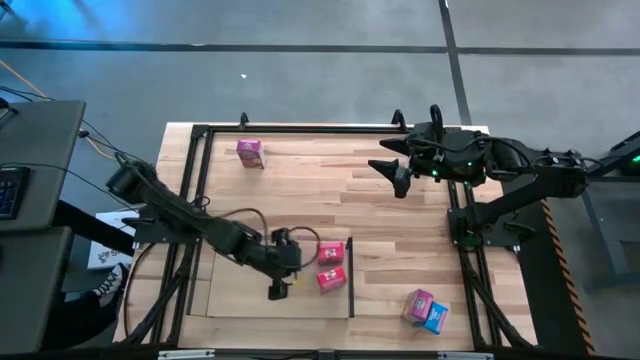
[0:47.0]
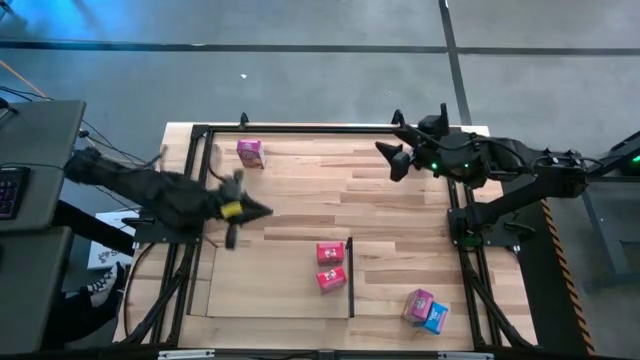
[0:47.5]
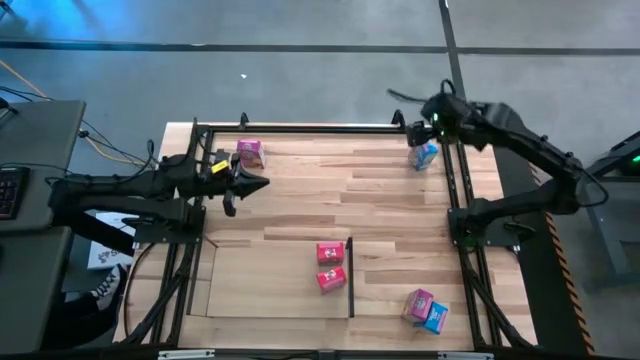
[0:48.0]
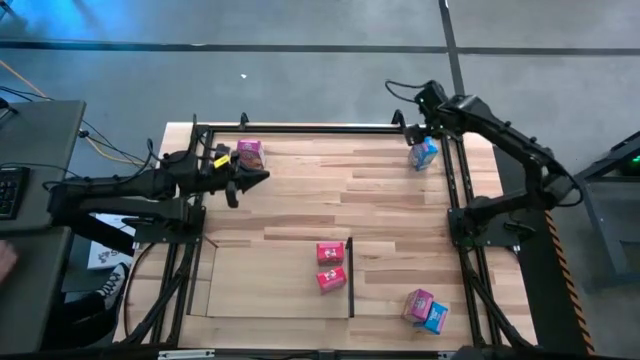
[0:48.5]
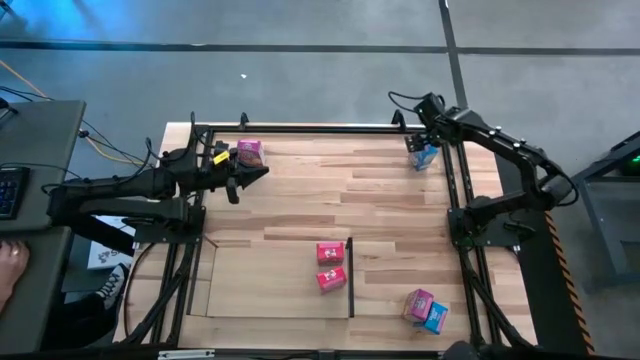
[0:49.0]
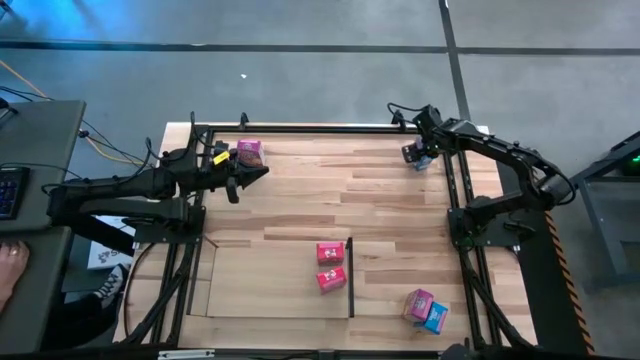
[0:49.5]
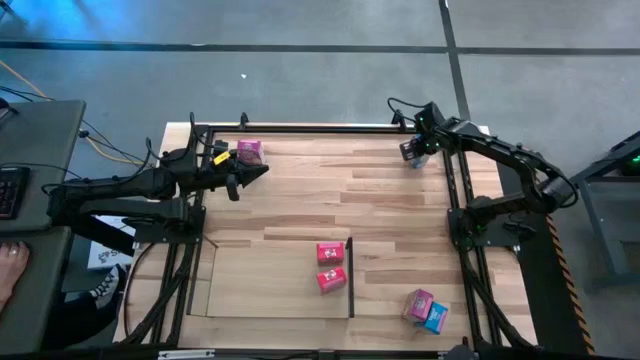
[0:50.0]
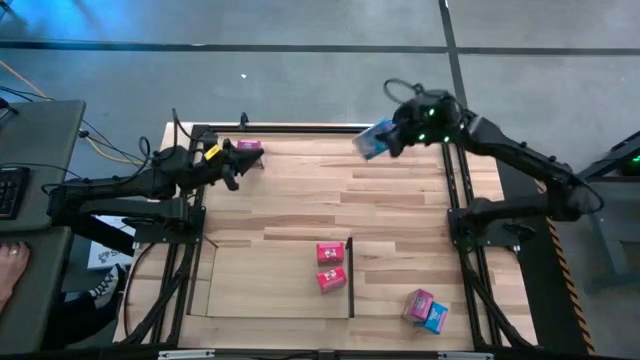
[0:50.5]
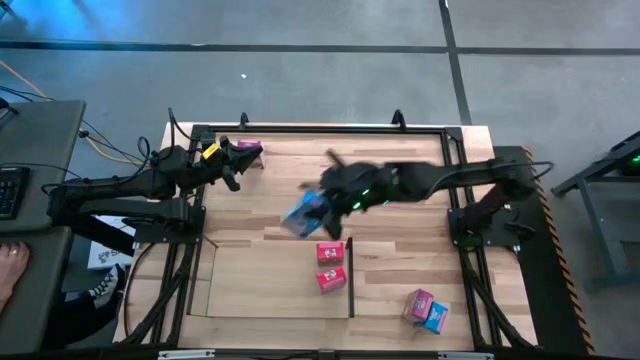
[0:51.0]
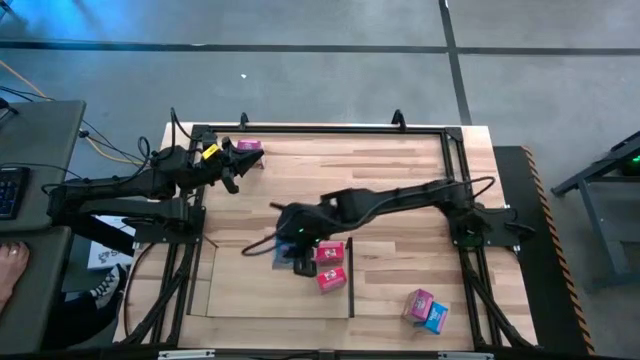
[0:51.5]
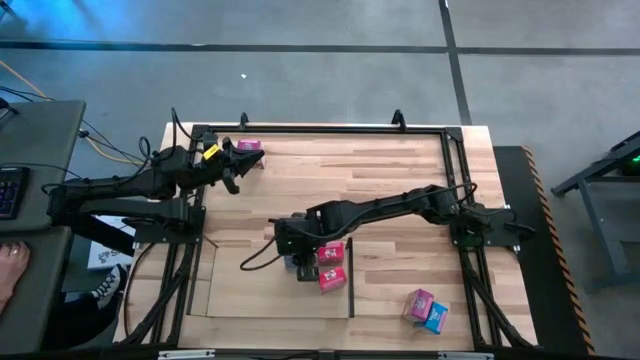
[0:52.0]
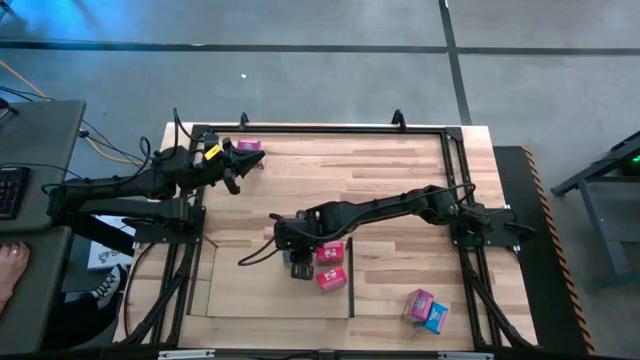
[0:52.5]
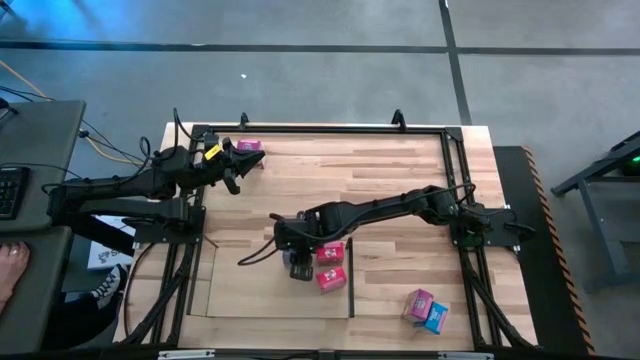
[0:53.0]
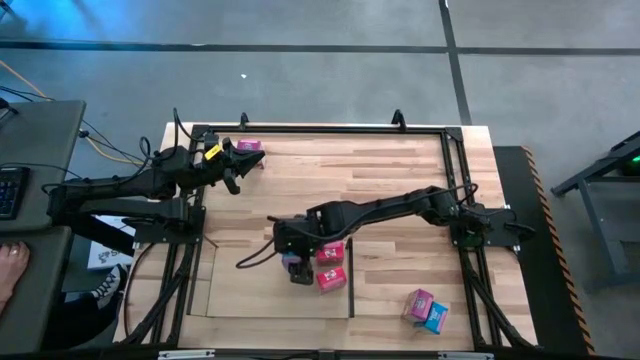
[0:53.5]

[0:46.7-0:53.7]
Task: Stack cereal on shelf
Put the top blue cereal box on the shelf

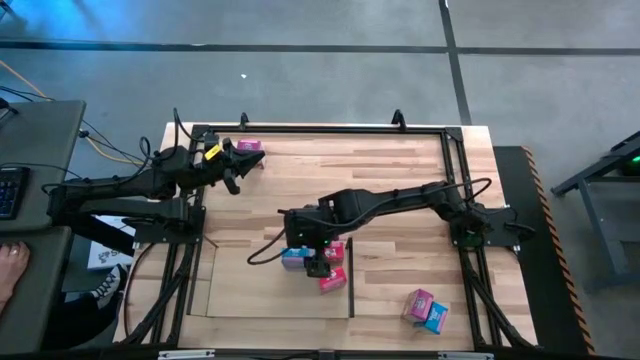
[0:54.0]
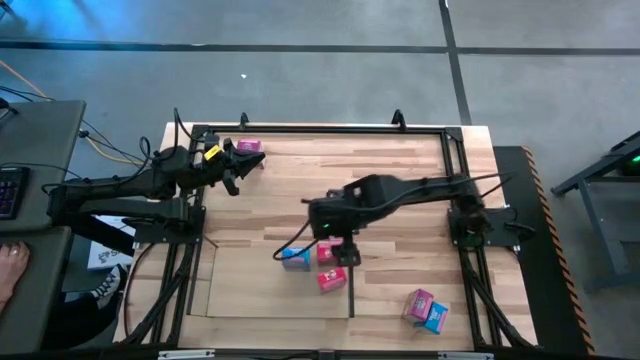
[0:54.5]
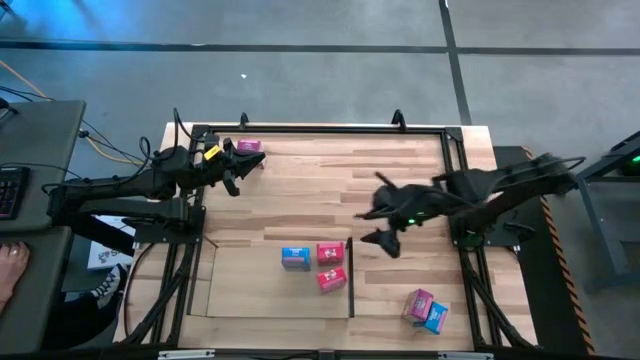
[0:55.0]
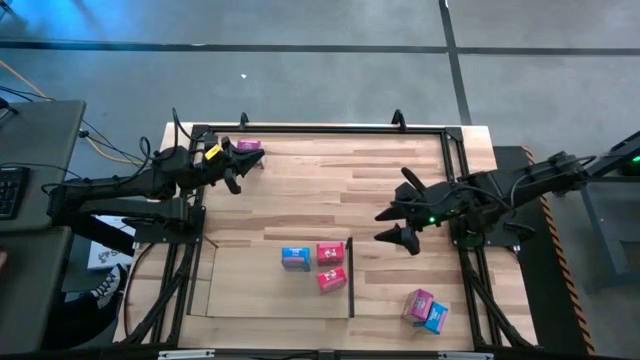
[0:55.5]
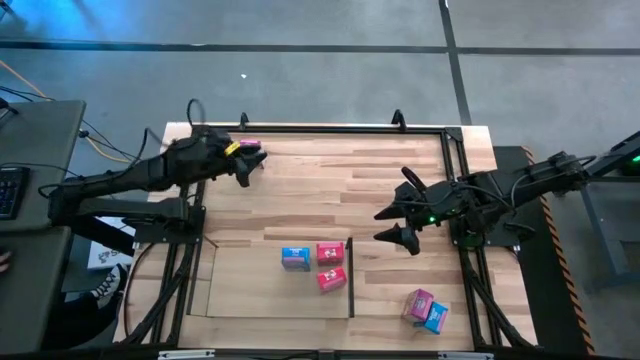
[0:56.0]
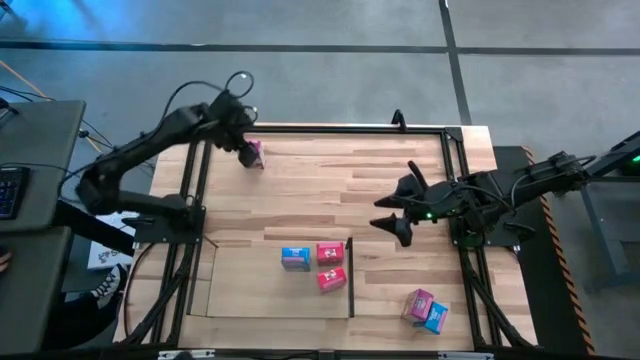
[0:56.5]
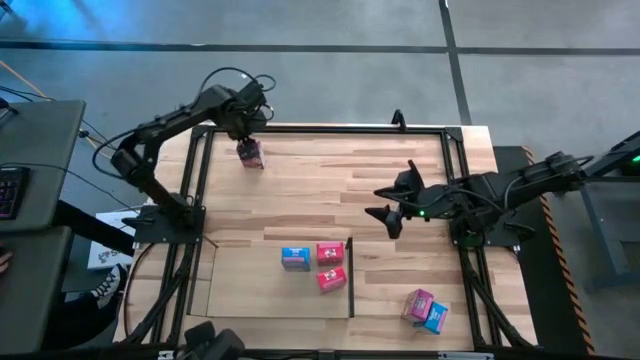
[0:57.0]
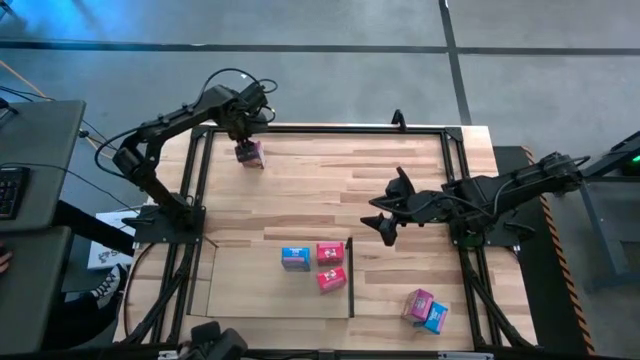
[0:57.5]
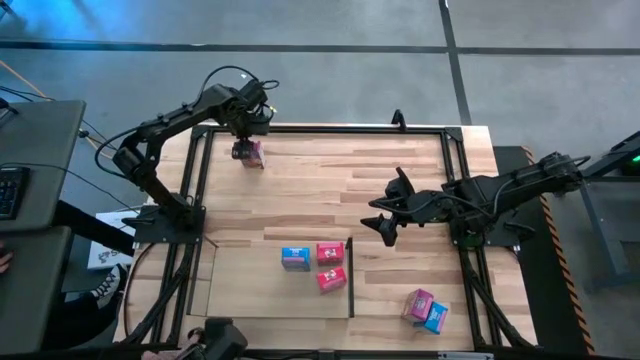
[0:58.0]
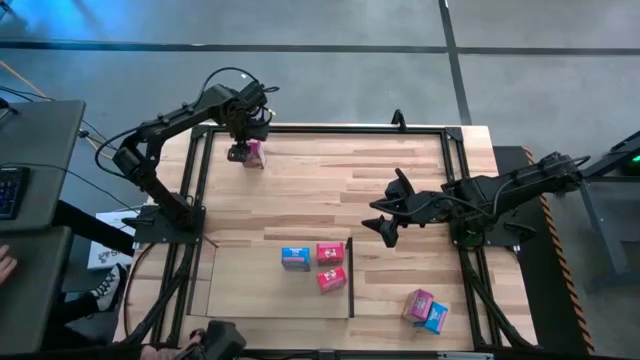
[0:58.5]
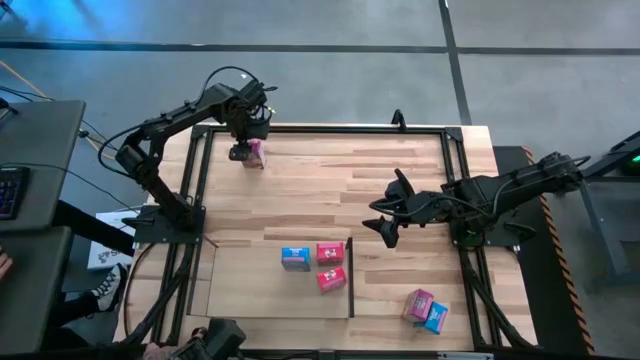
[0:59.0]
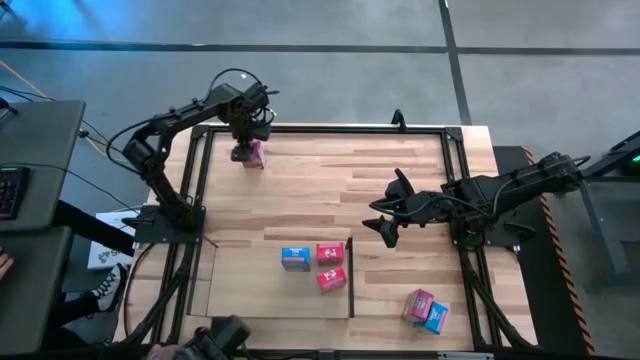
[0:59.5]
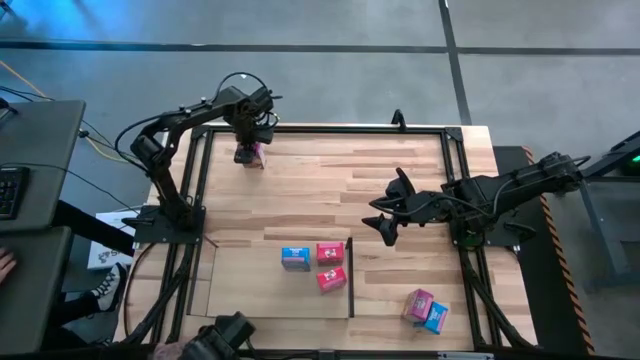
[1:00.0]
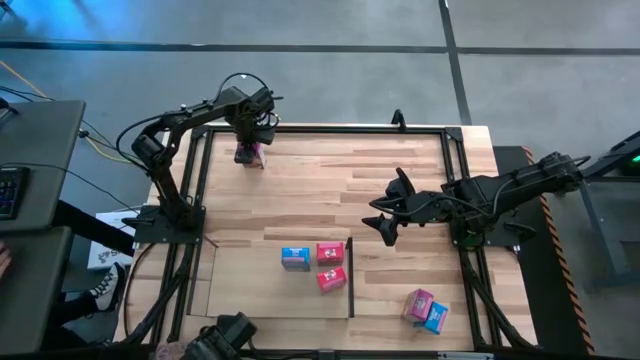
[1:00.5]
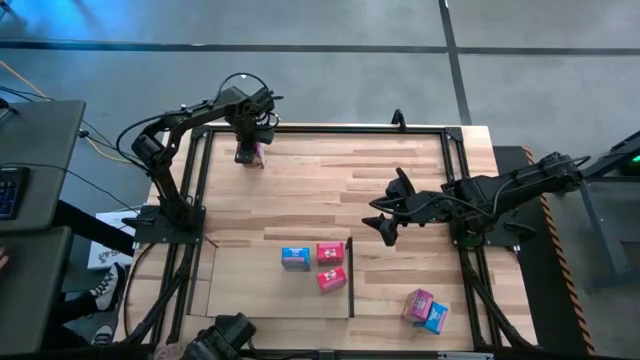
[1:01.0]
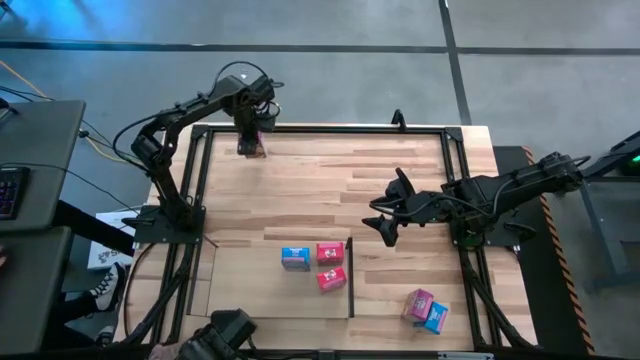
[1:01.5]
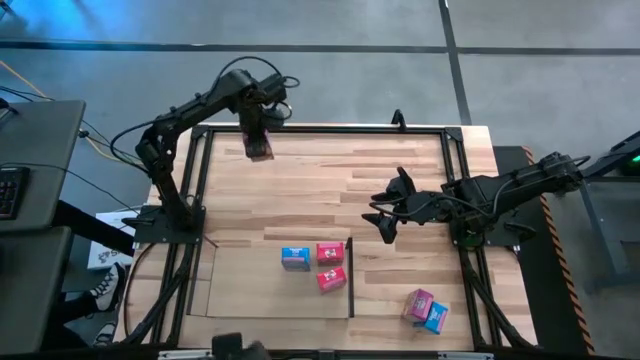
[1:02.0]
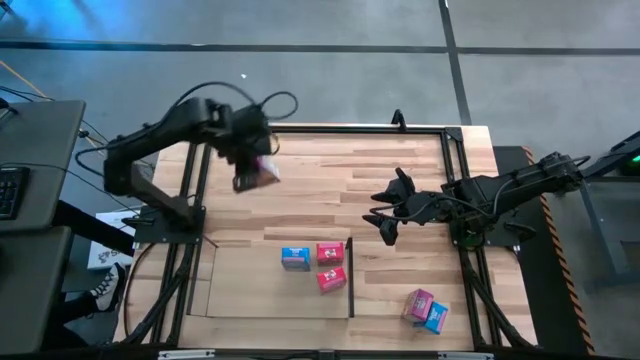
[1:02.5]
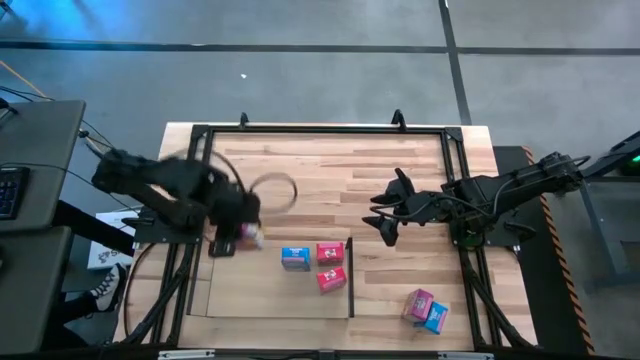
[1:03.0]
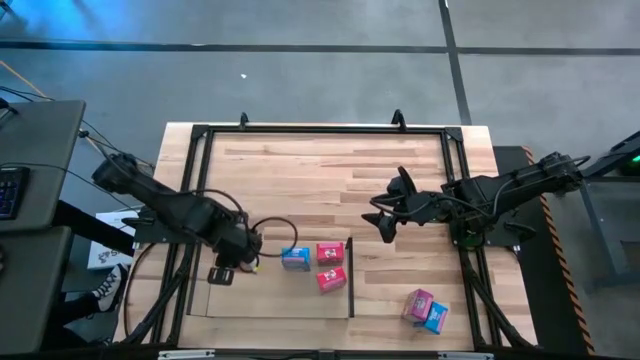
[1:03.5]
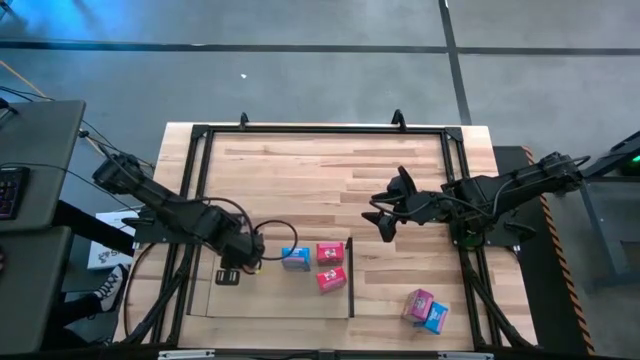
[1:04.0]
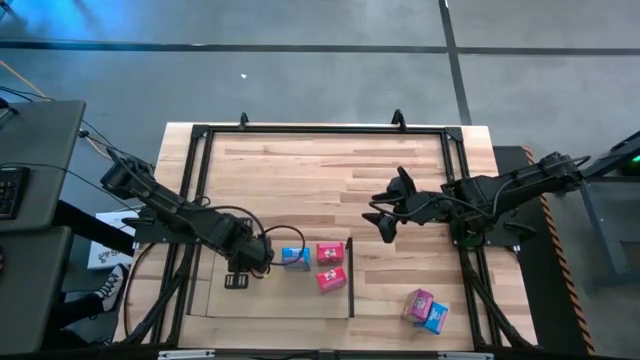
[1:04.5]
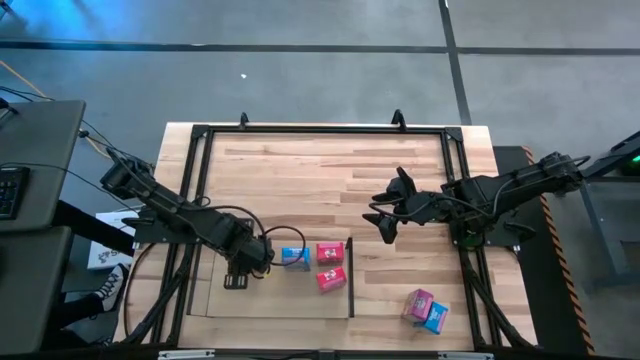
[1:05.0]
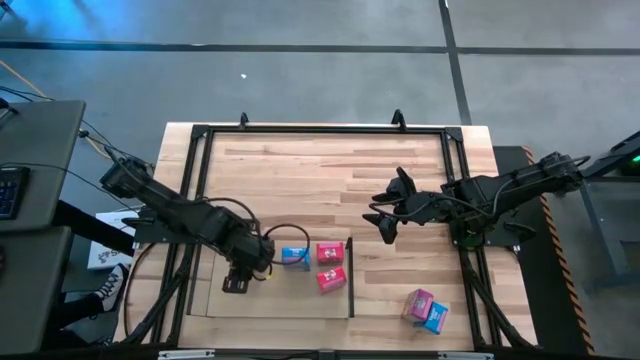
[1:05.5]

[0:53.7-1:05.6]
Put the top purple cereal box on the shelf

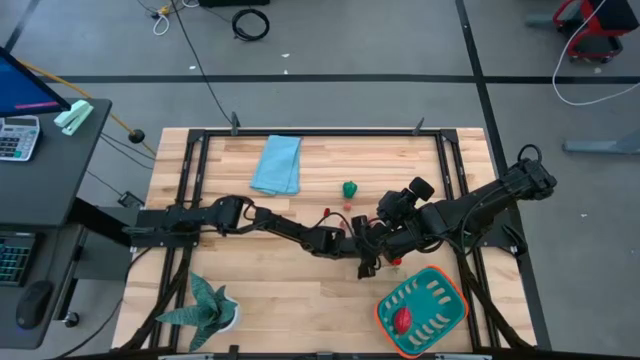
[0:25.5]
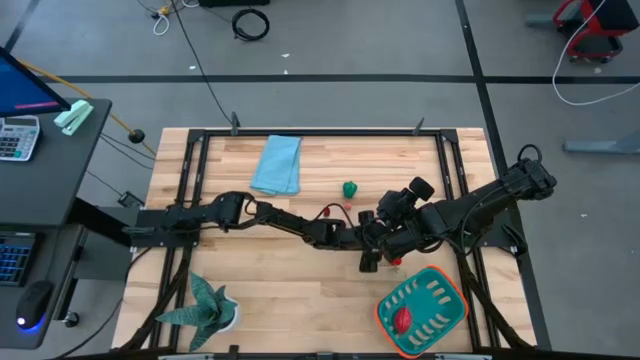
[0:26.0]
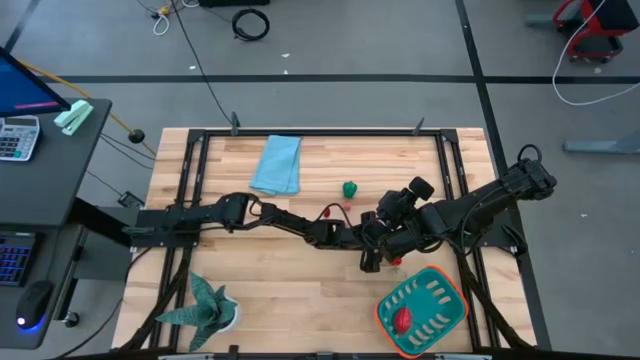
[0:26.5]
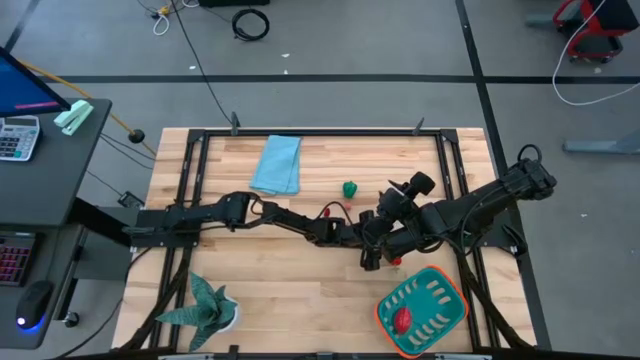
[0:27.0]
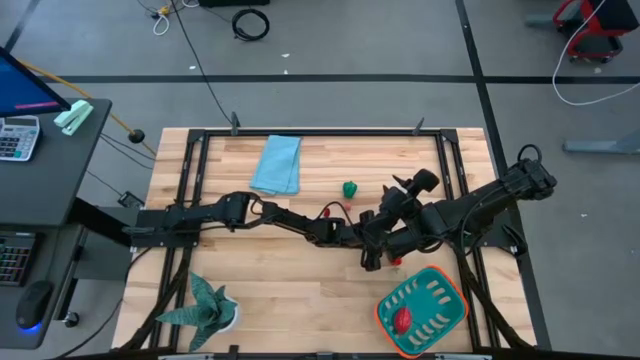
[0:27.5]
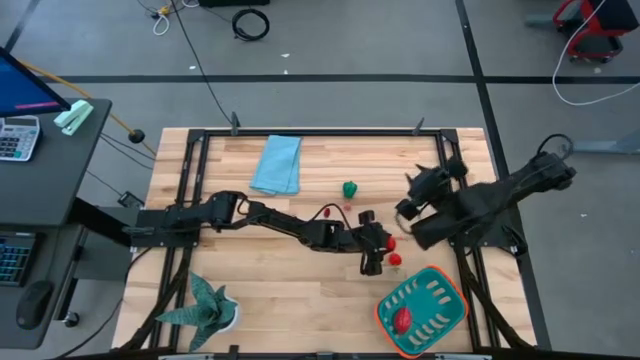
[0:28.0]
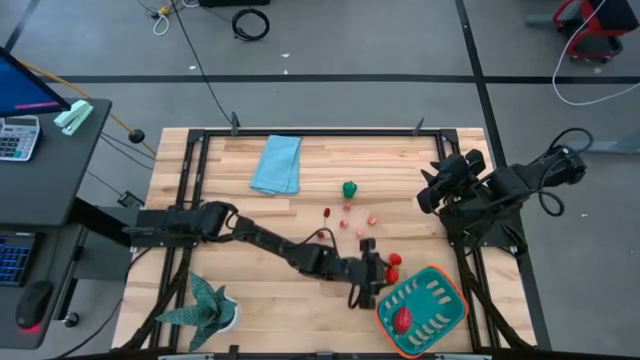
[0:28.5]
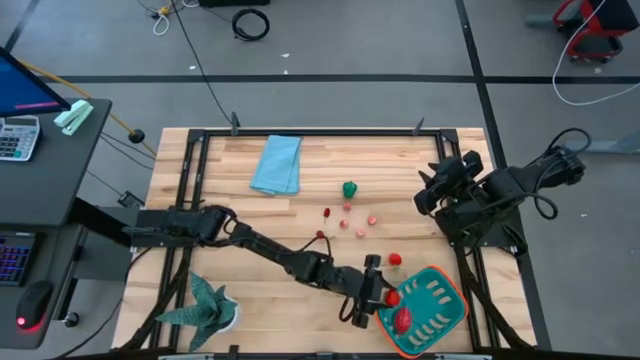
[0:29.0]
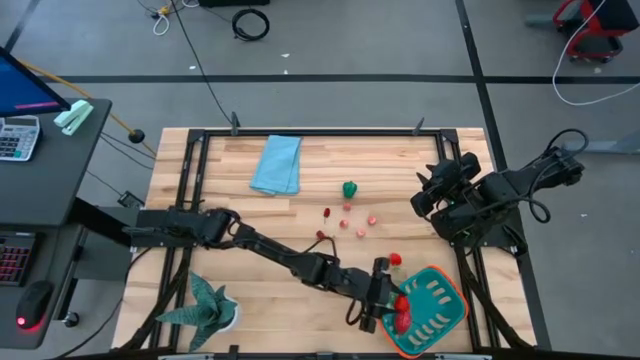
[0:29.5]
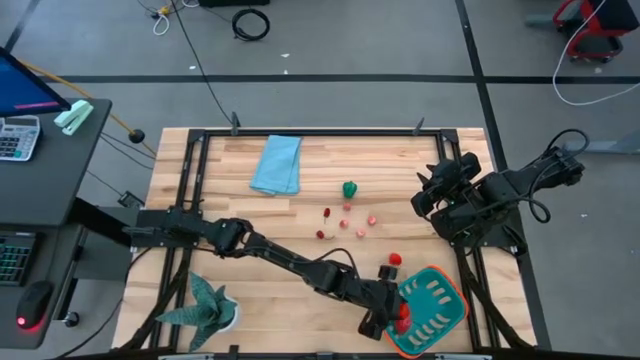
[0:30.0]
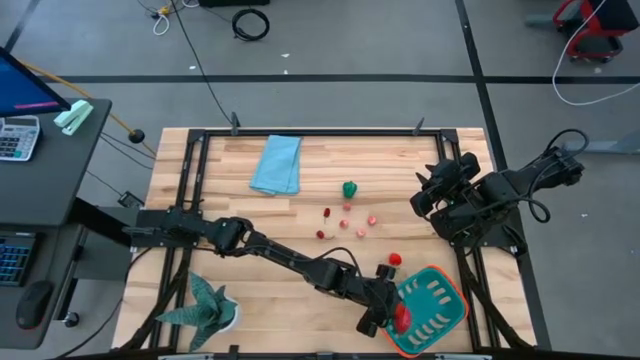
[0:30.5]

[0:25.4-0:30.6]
Task: Pick and placing Produce into tupperware
Put the red strawberry into the blue basket
